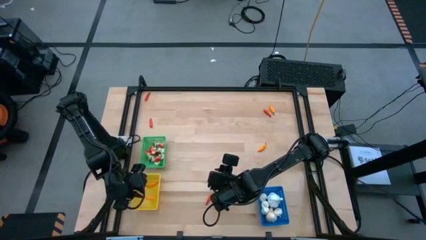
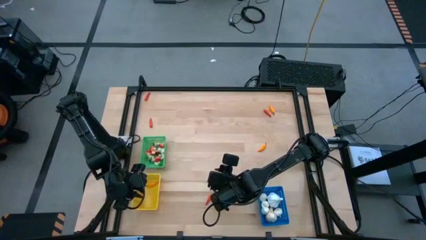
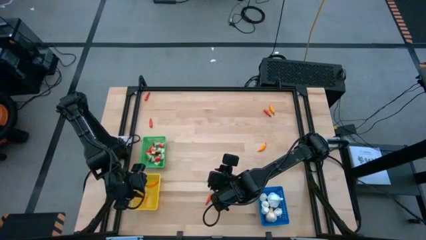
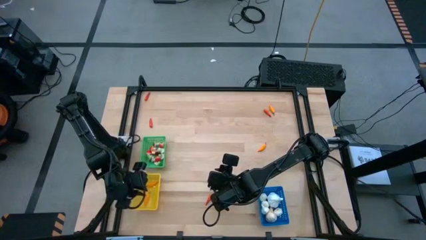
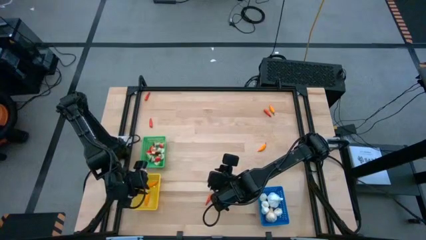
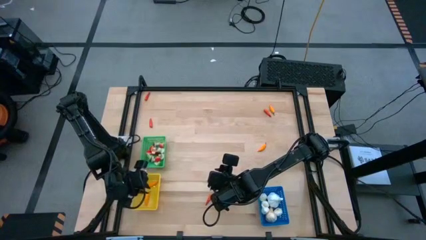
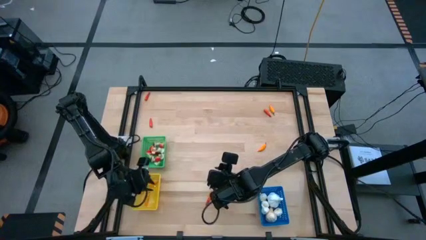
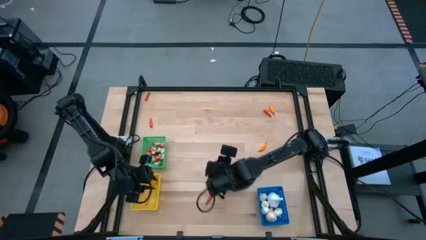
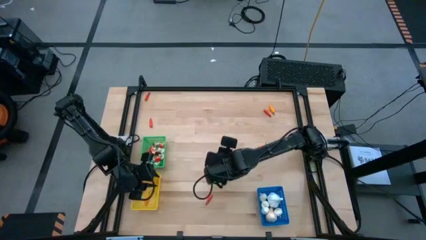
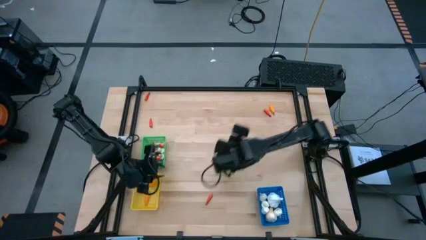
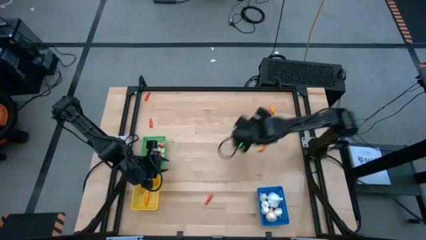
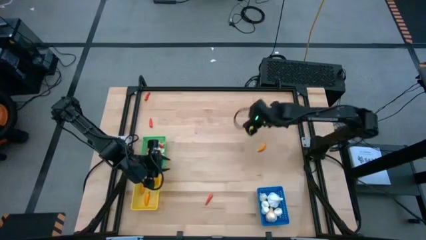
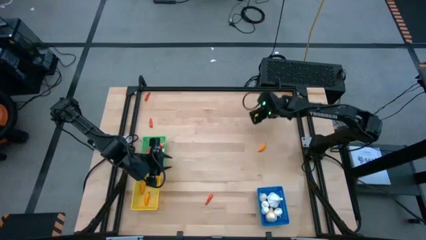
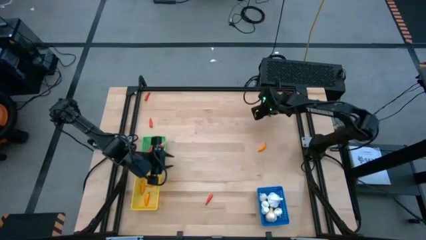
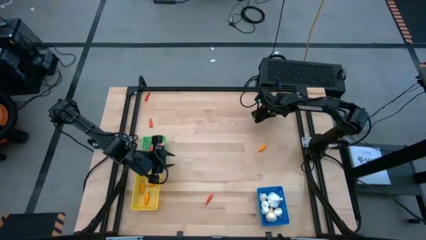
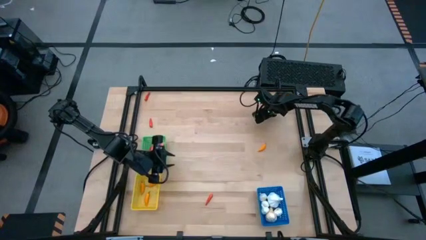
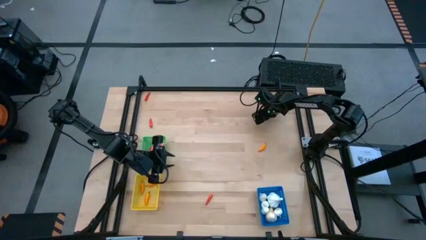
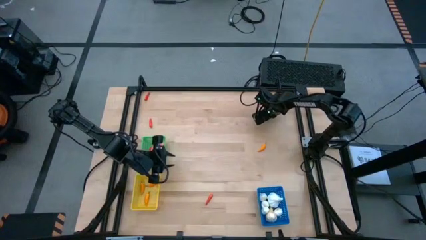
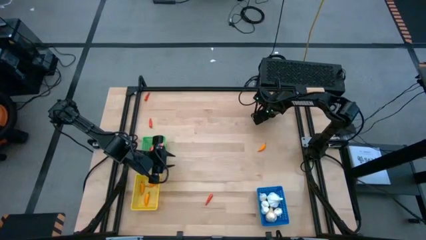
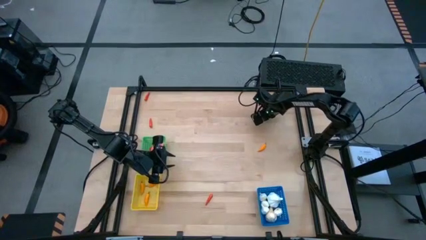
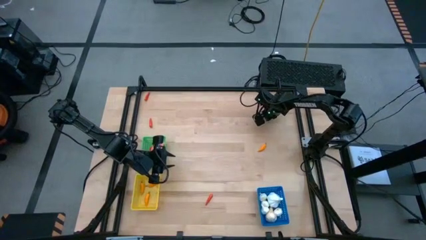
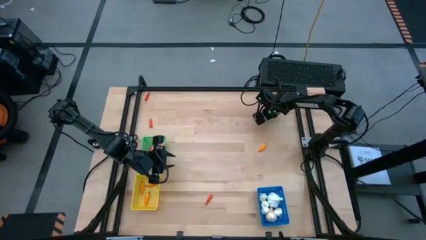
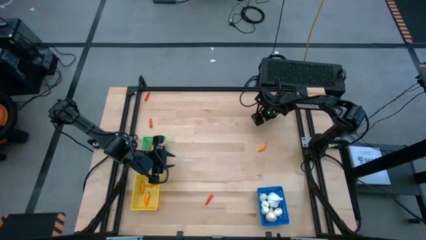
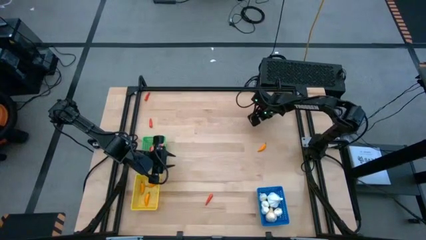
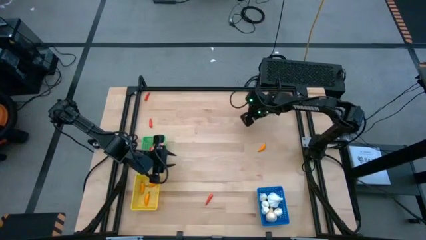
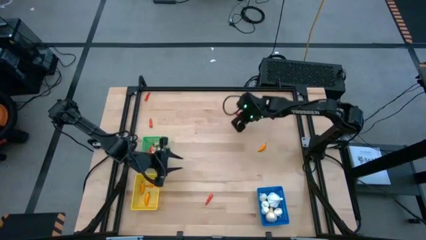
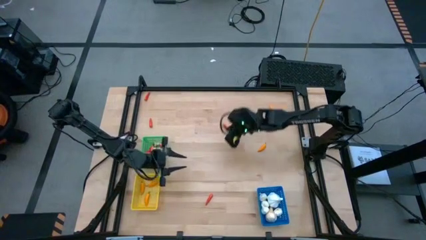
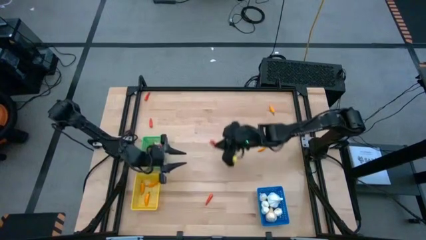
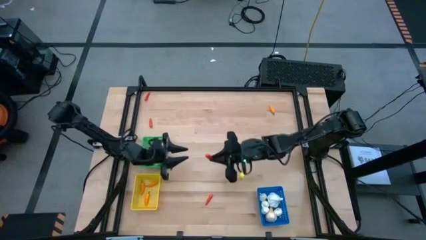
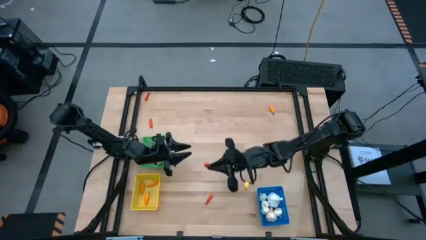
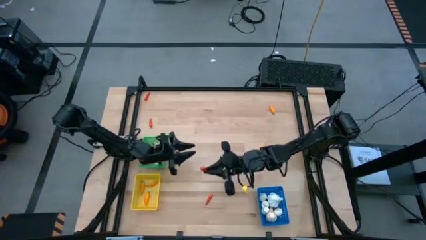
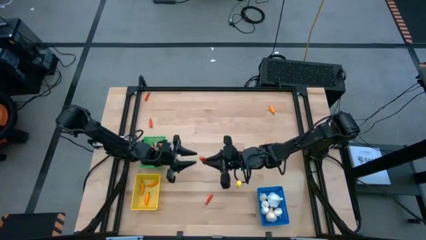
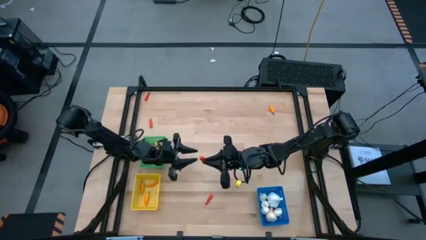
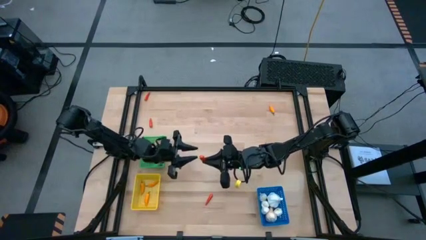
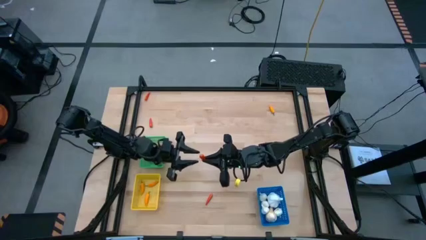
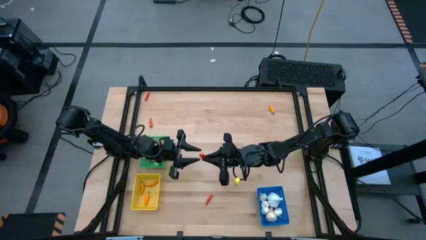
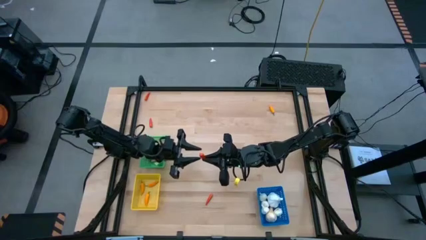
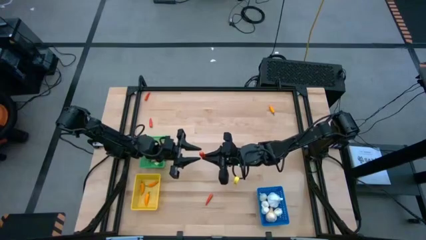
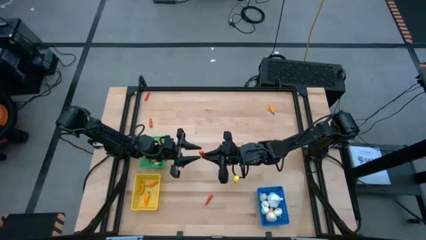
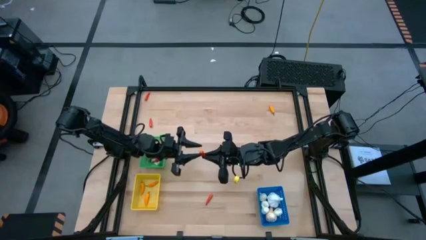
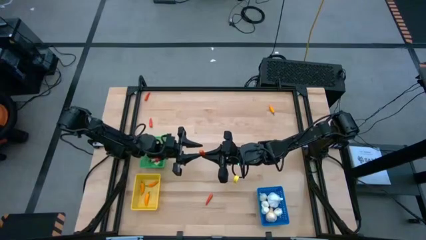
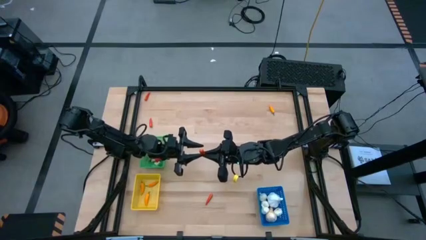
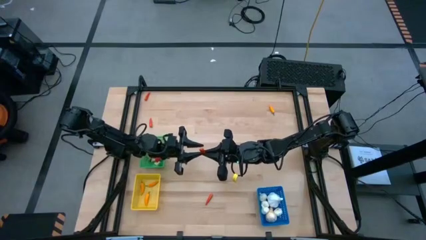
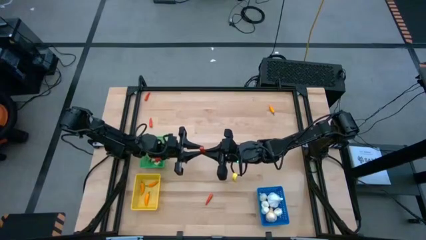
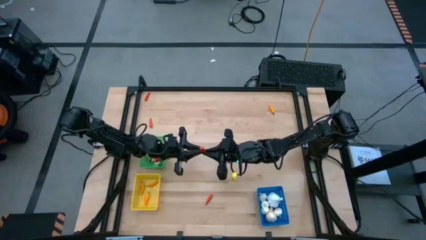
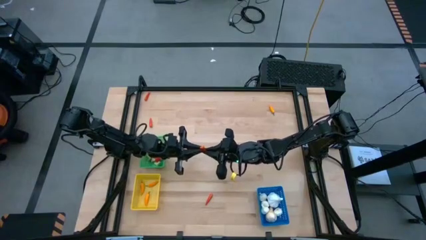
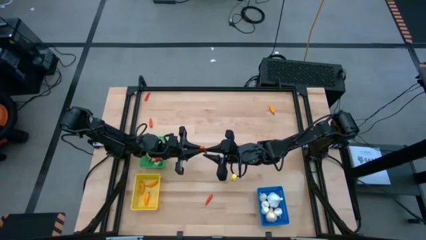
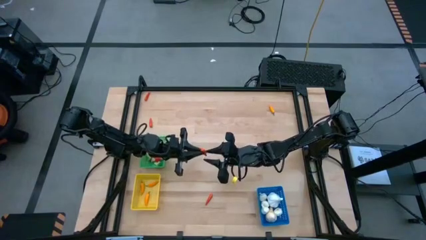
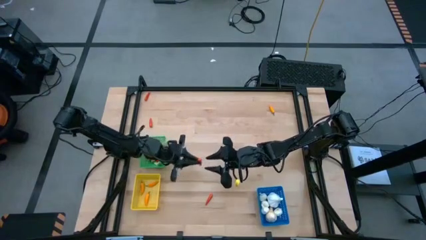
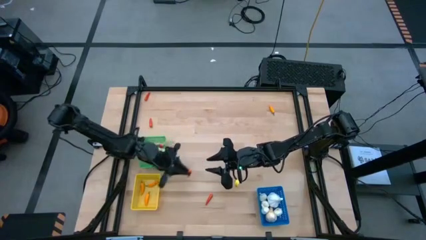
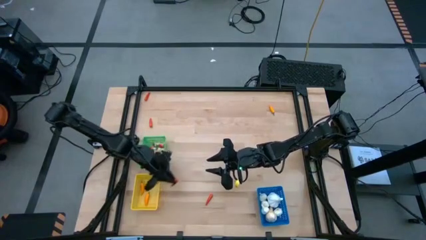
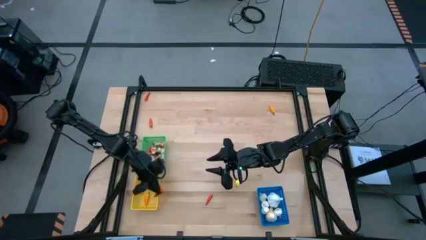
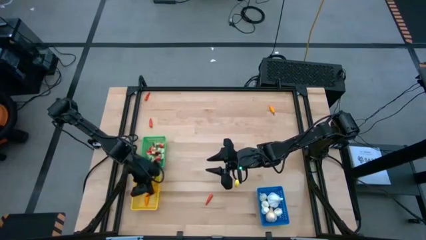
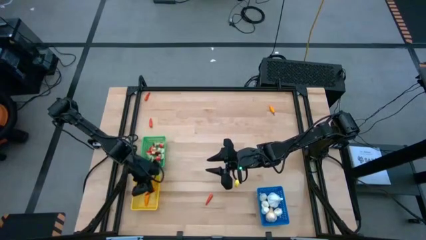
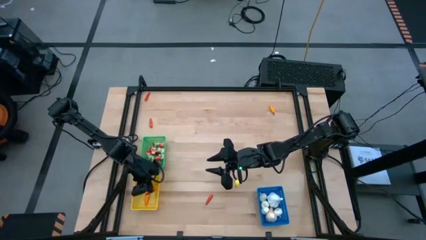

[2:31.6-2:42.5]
Task: Sort produce into baskets
Put the red chili pepper into the yellow bin

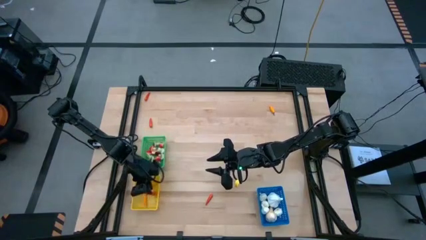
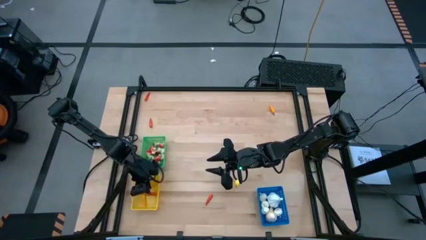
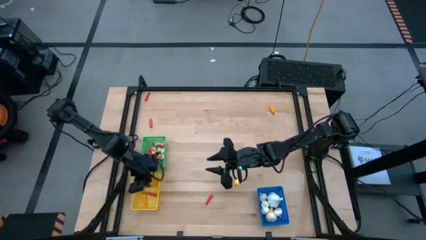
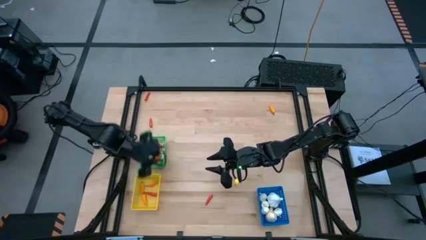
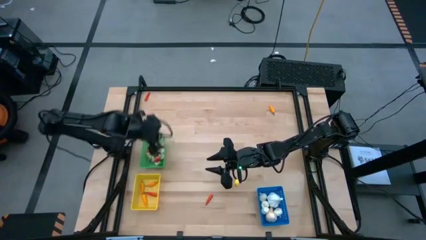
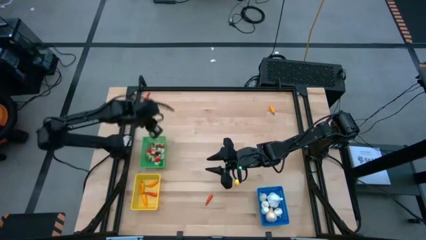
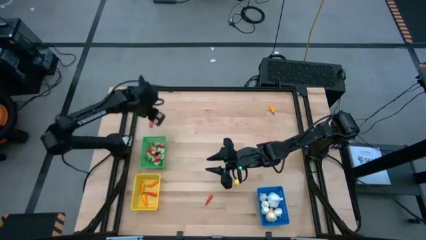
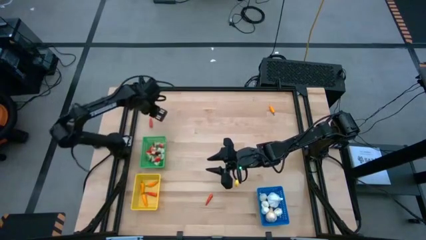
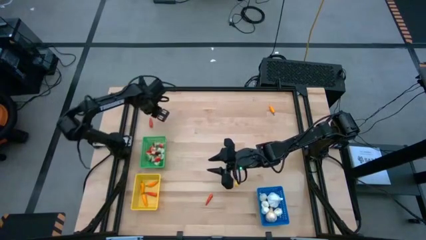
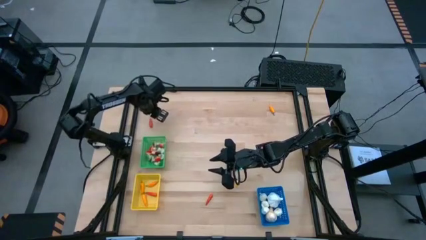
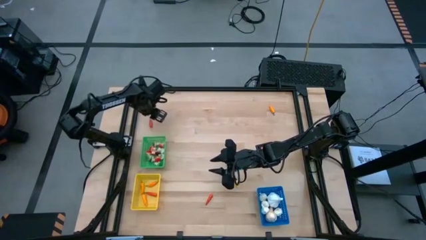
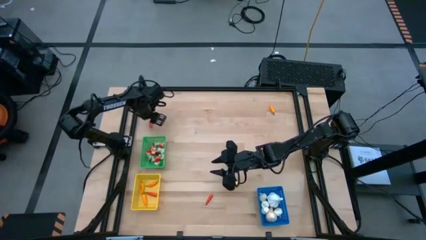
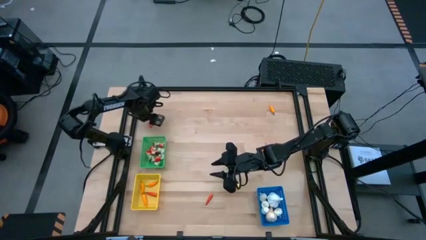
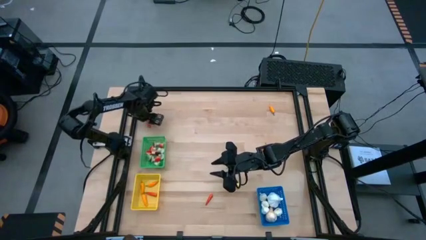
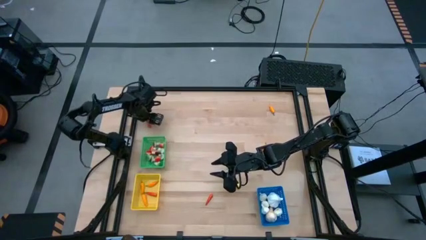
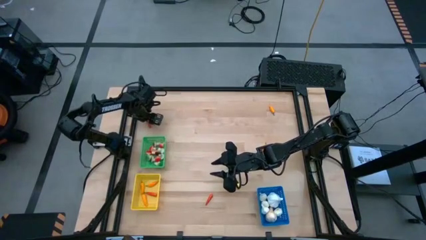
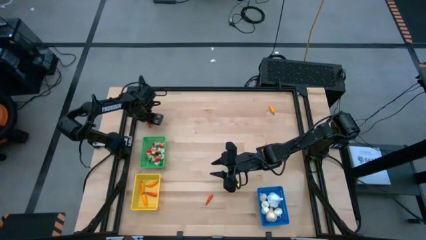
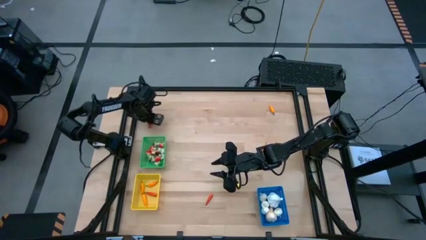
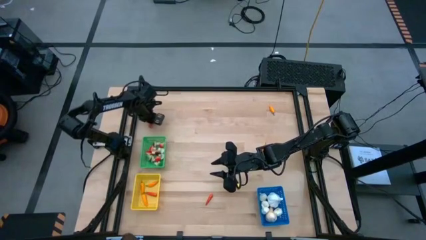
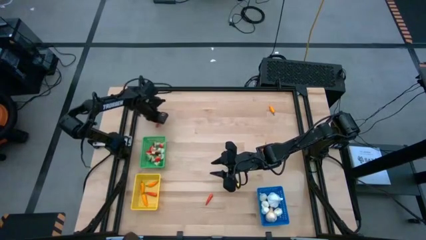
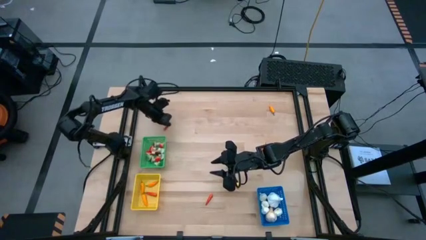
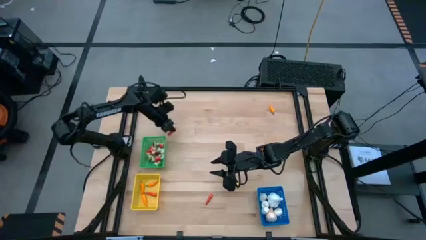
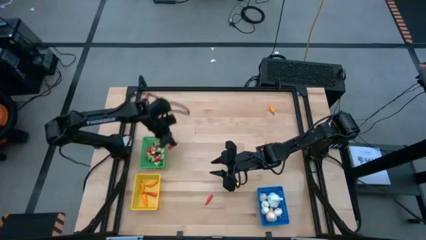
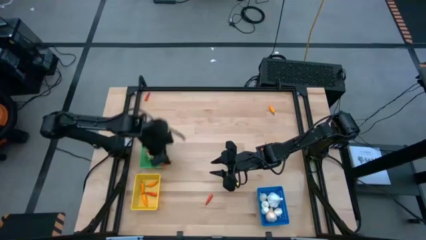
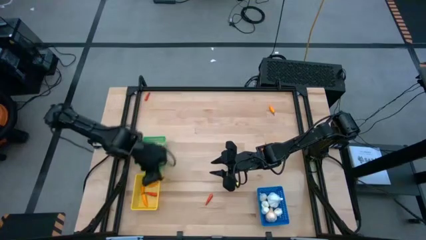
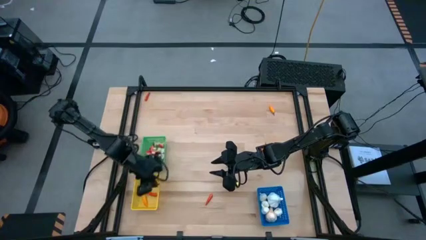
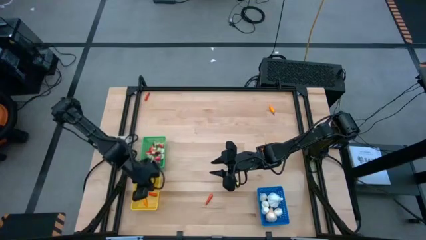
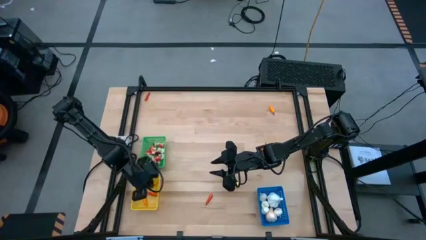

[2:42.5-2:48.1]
Put the red chili pepper into the yellow bin

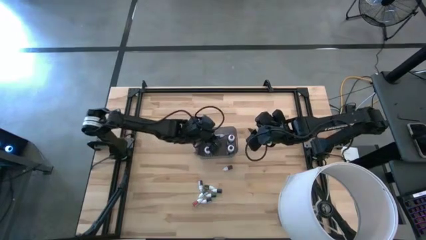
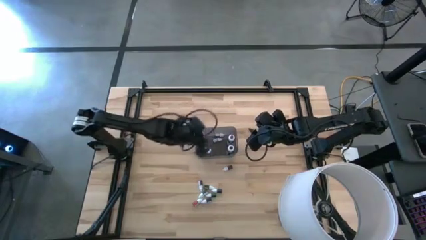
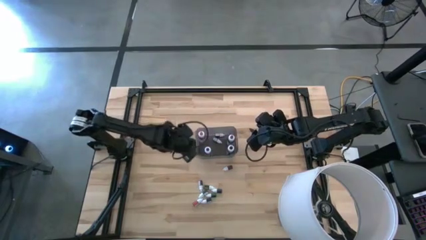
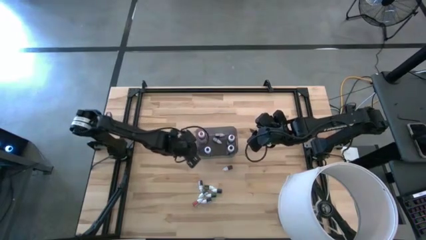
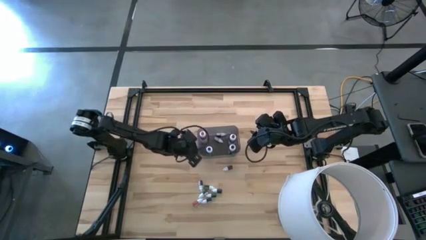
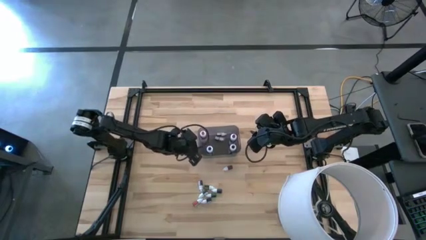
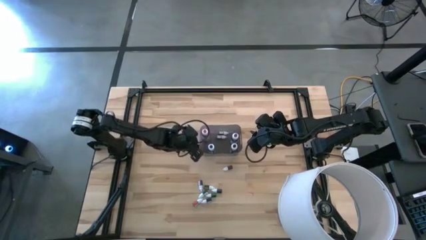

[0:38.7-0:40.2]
Task: Pick & Place food coloring
Adjust the black bin
